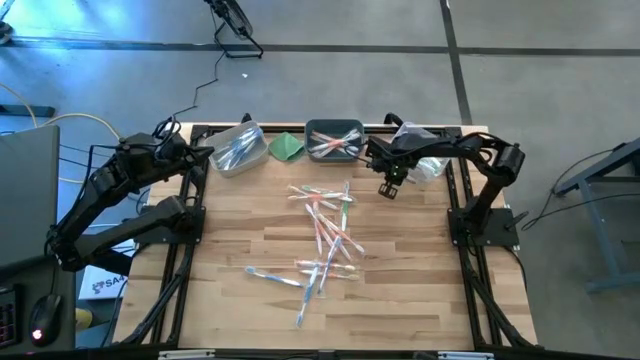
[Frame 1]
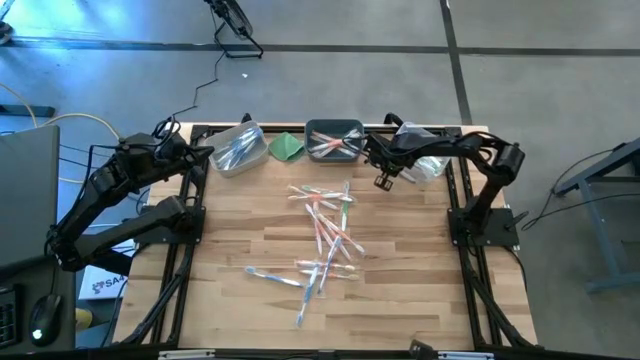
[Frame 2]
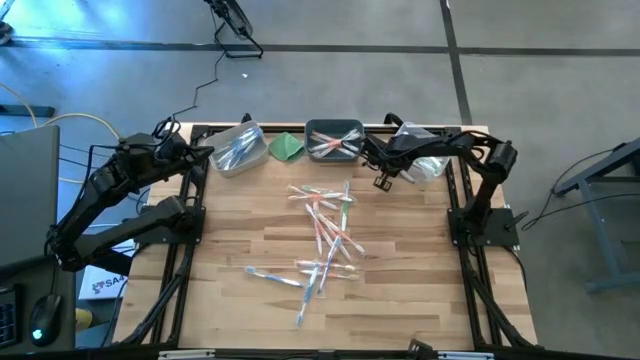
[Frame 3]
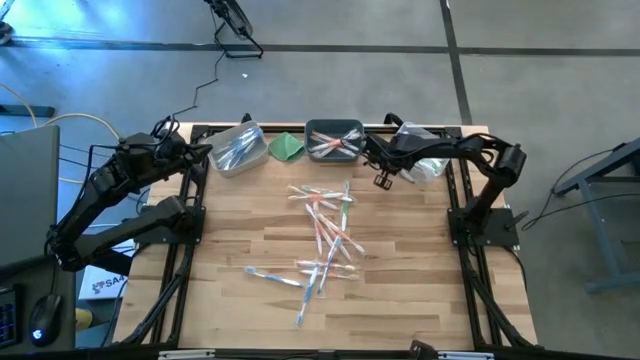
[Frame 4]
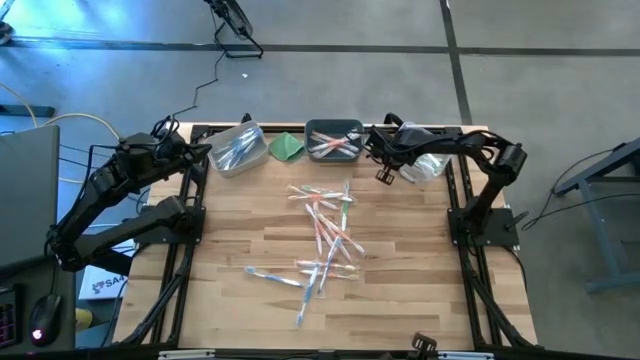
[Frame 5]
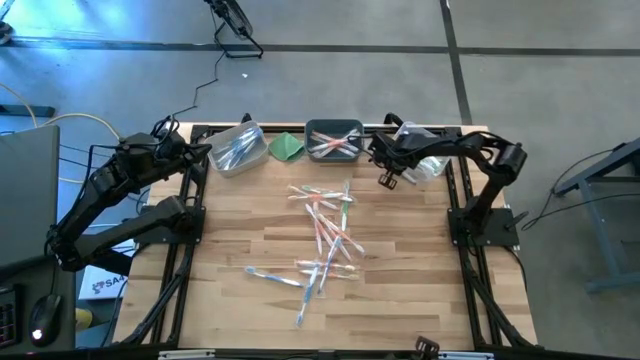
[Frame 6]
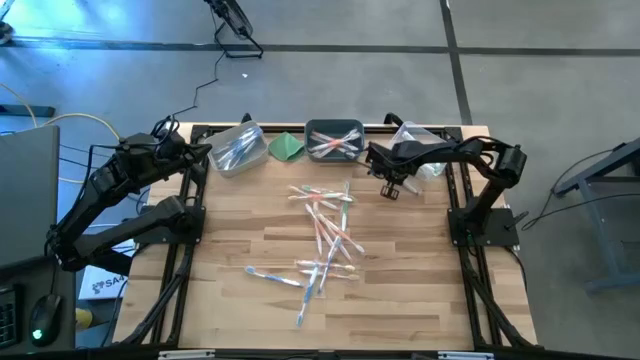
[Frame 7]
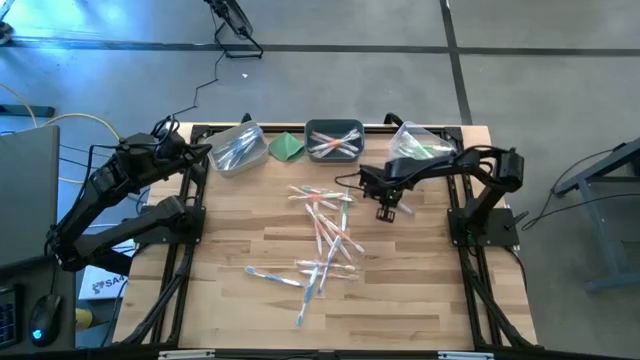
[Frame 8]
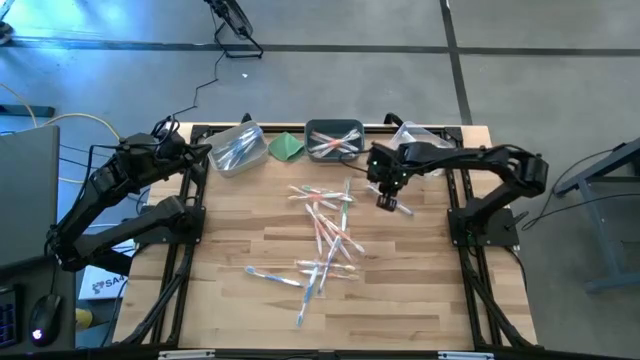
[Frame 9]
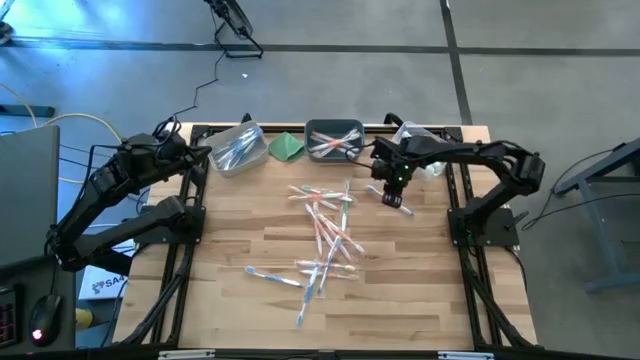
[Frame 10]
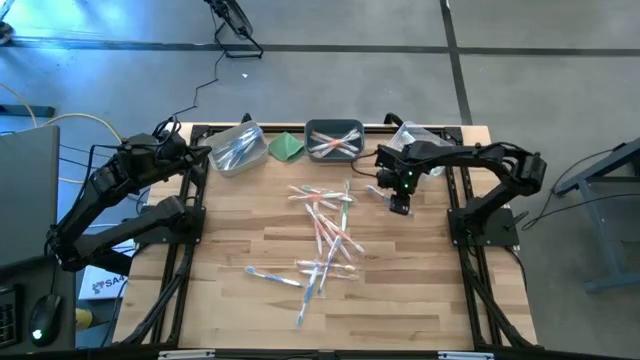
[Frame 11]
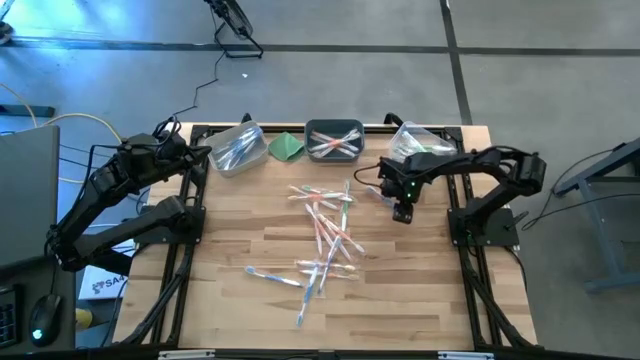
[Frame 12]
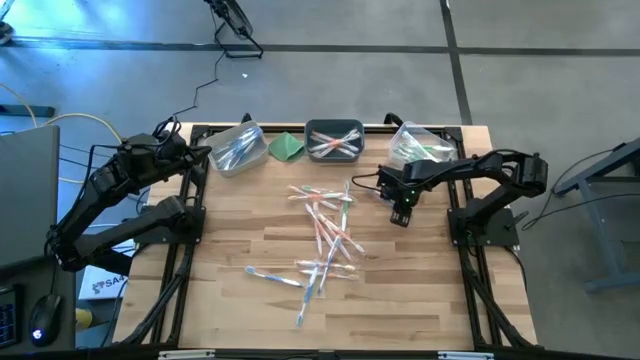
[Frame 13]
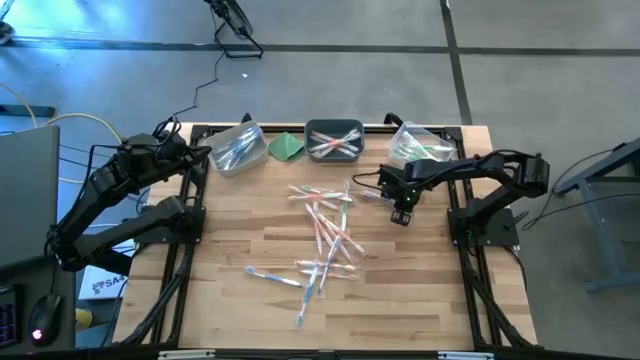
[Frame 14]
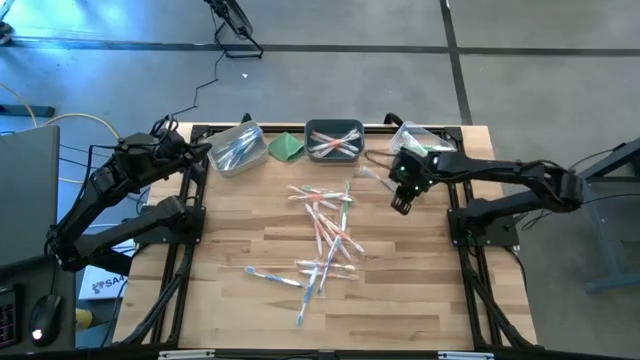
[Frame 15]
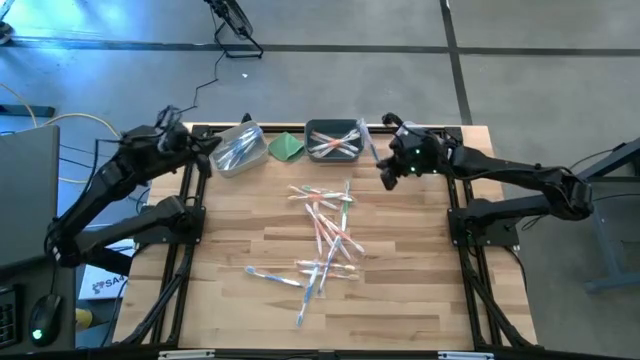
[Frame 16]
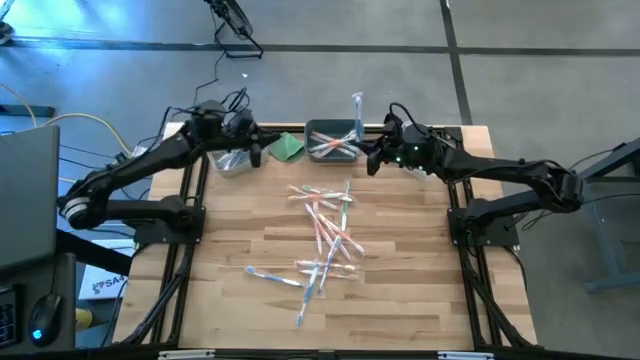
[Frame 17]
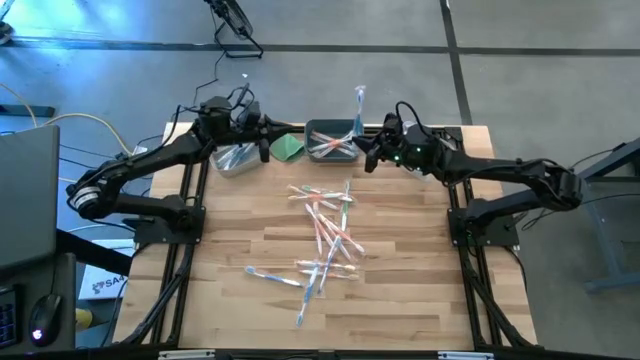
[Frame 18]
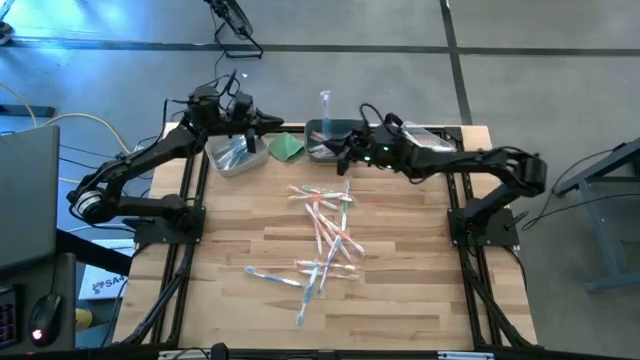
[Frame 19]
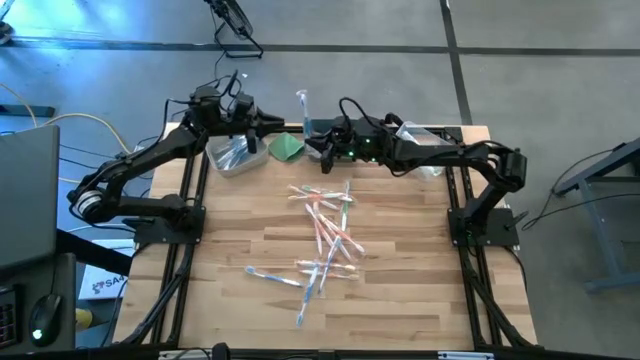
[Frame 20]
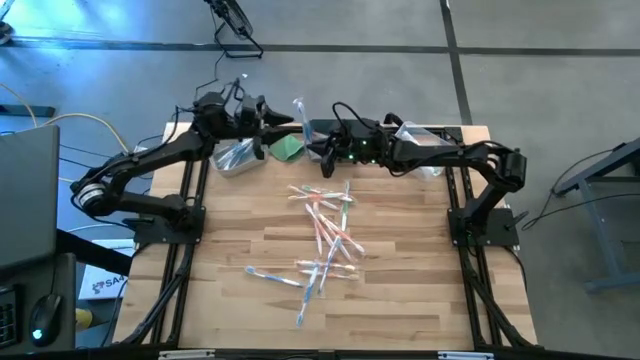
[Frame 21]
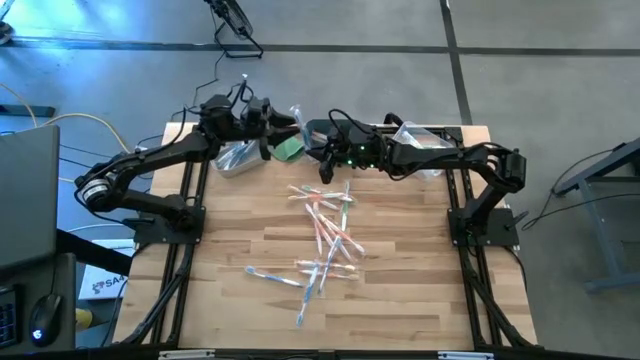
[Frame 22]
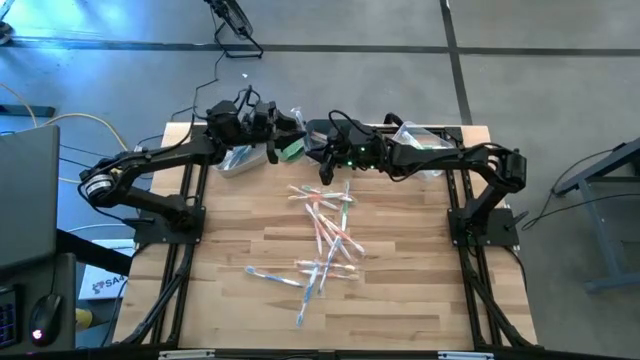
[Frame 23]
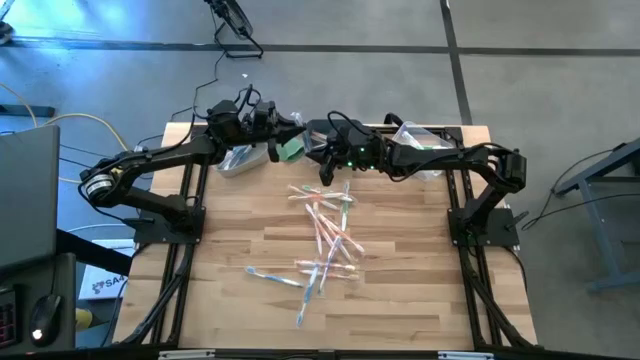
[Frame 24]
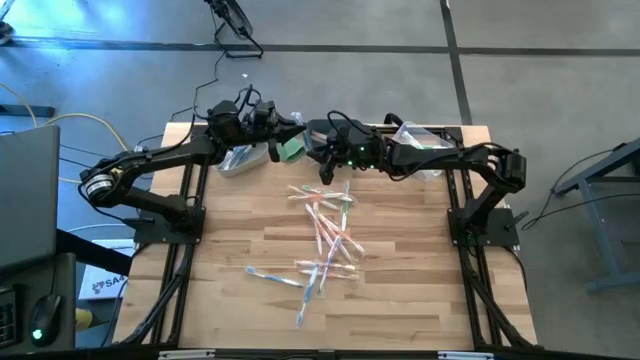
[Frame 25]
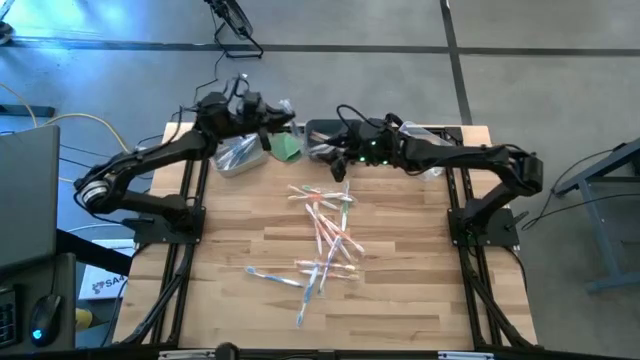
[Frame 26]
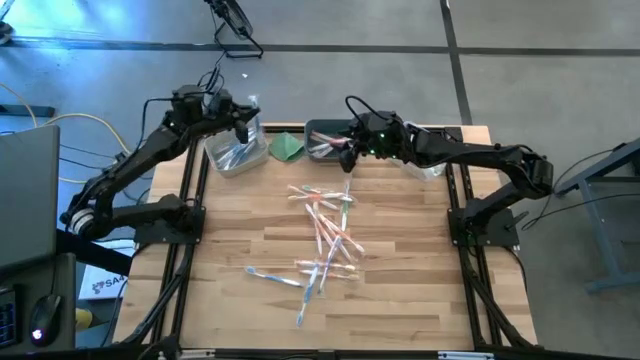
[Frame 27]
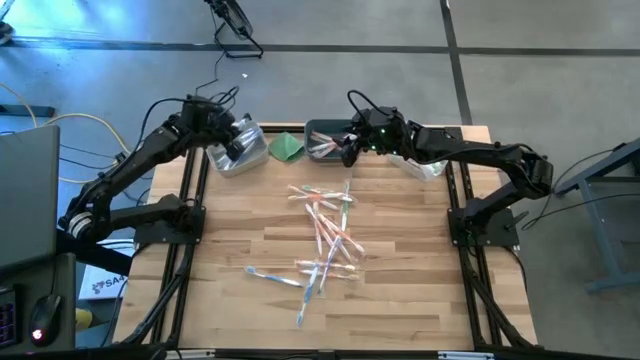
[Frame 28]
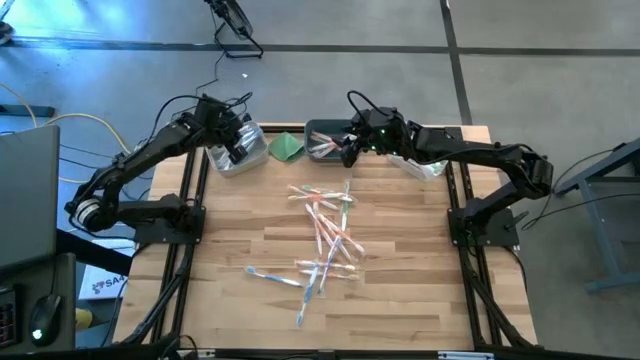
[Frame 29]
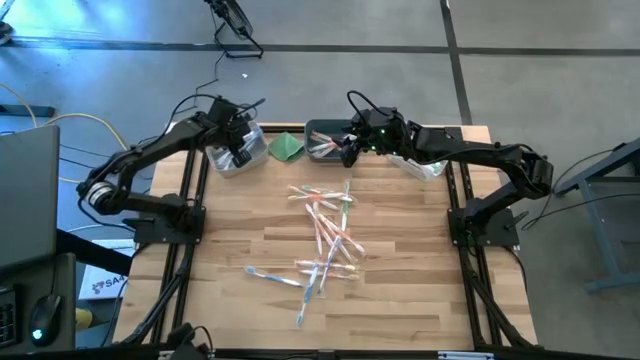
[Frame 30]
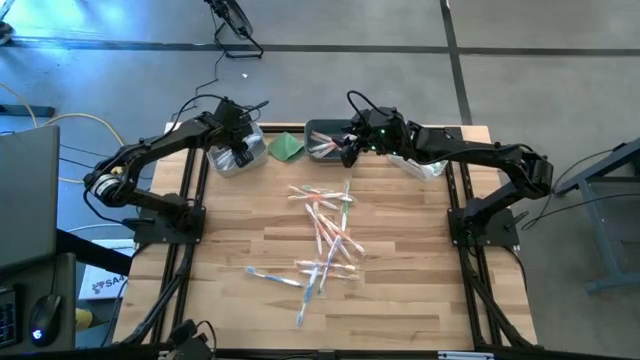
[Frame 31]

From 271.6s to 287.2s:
Task: Pick & Place Toothbrushes
Put the blue toothbrush into the gray bin

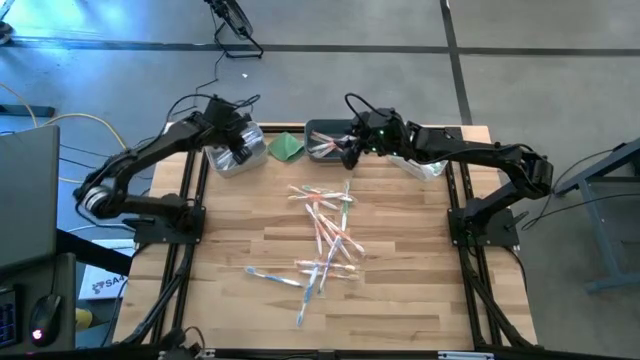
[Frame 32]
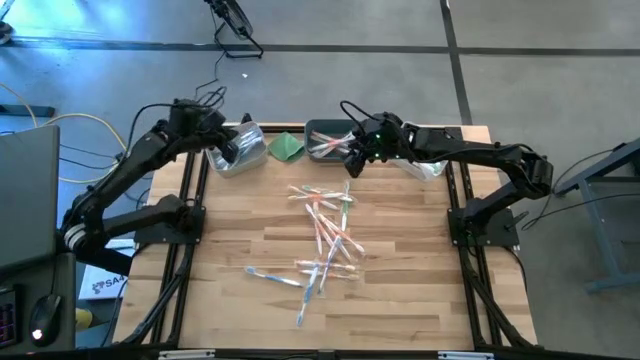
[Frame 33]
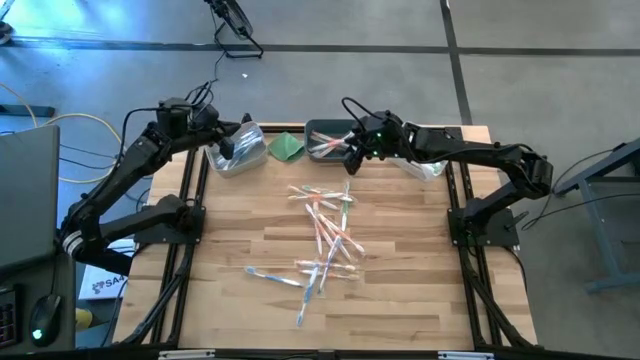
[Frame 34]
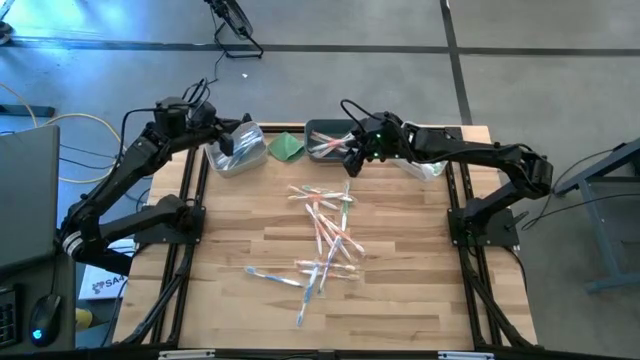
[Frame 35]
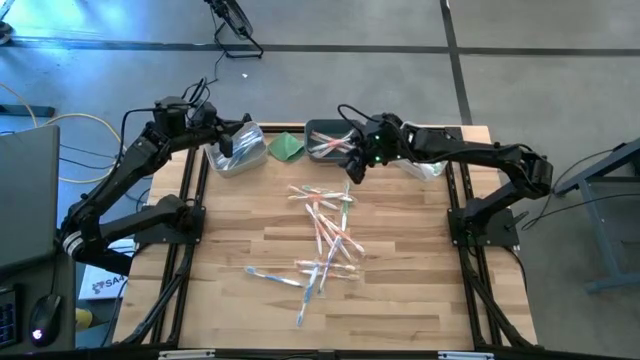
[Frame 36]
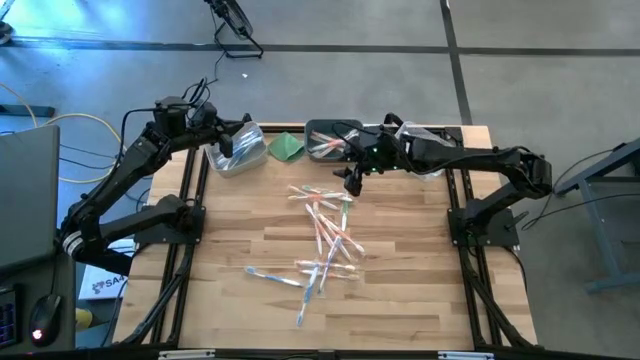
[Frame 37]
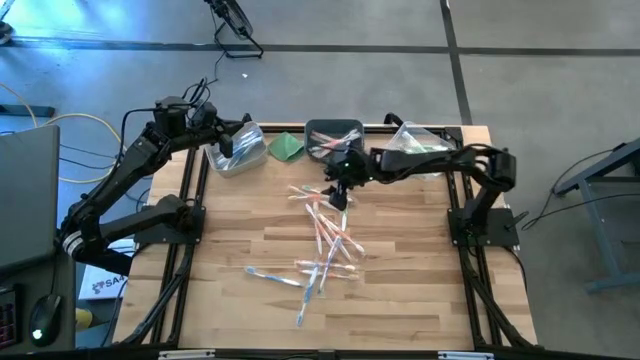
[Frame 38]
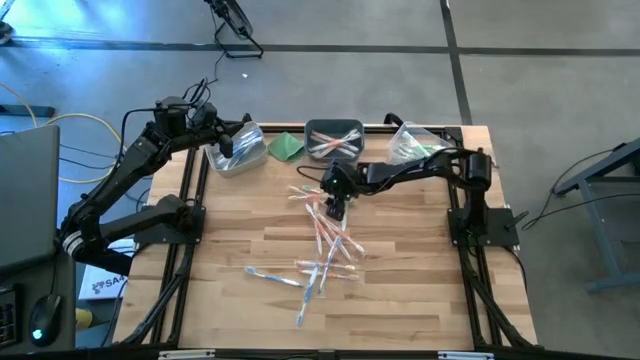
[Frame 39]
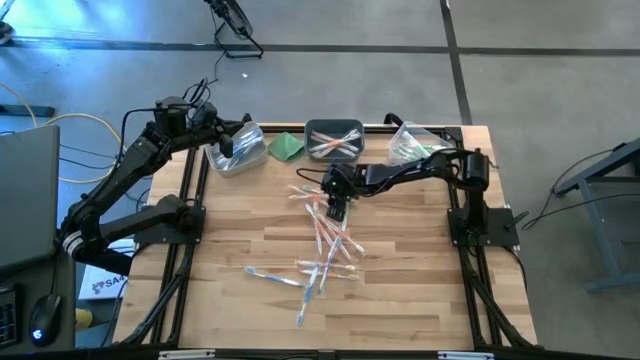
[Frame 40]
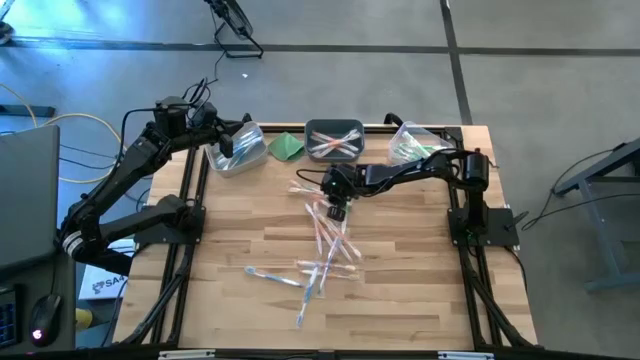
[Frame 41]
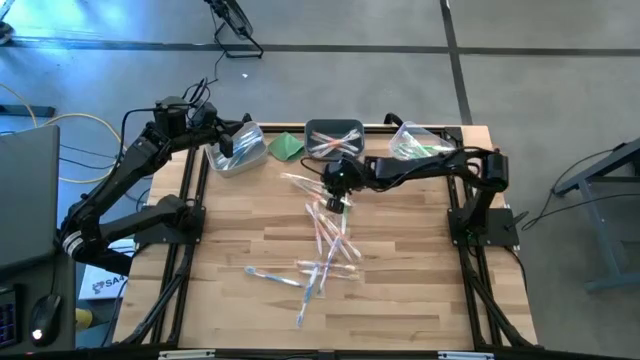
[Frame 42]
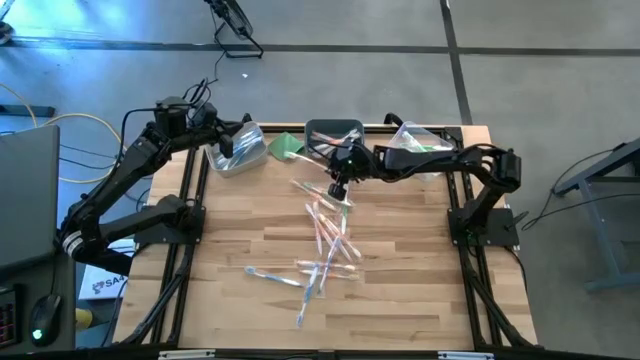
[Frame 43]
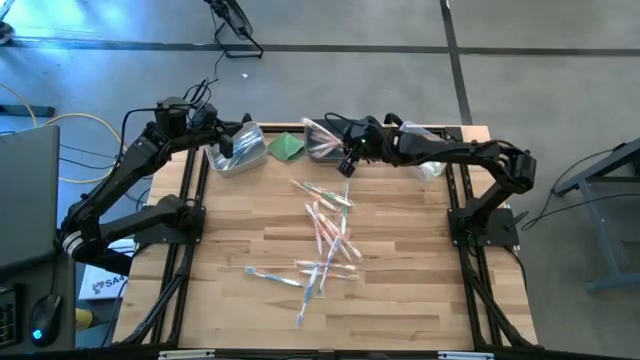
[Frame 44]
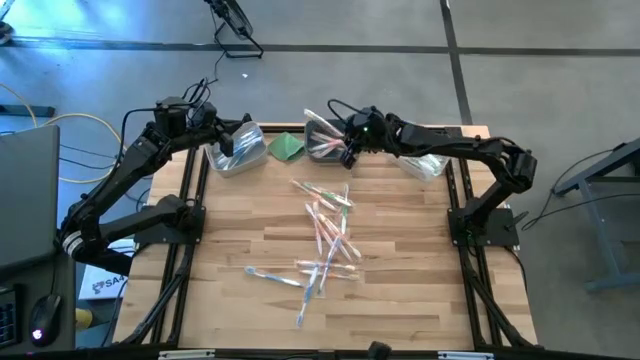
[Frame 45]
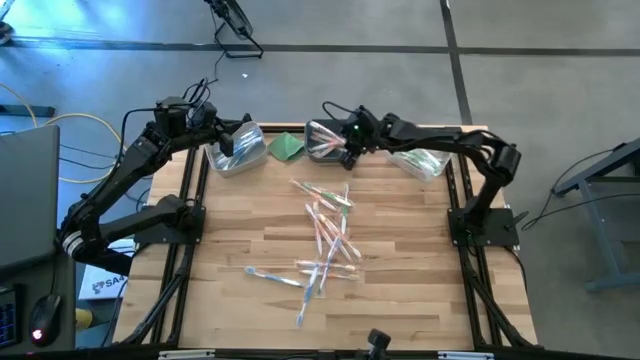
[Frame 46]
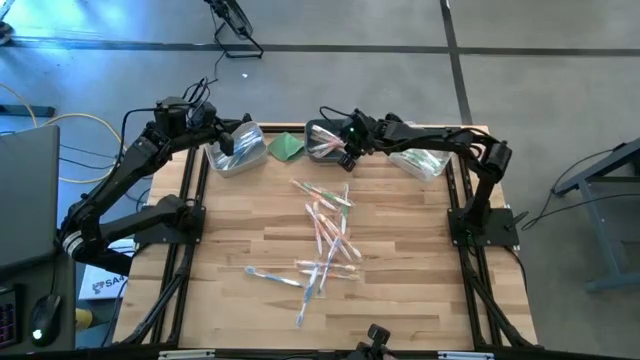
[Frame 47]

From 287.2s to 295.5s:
Put the orange toothbrush into the blue bin
